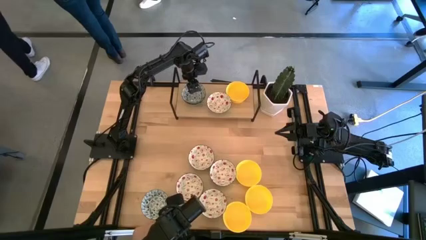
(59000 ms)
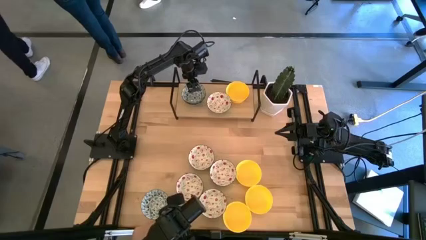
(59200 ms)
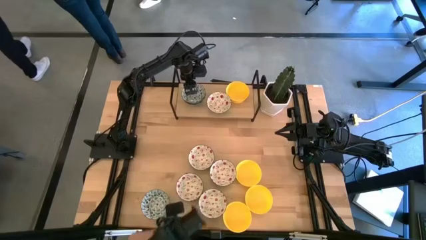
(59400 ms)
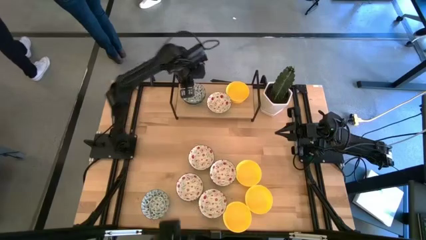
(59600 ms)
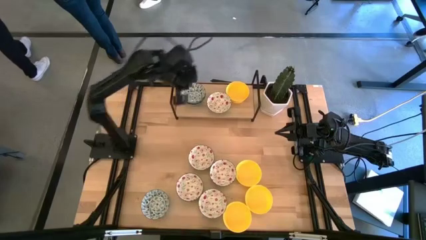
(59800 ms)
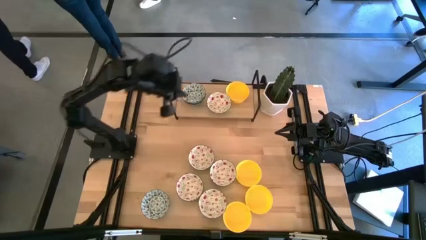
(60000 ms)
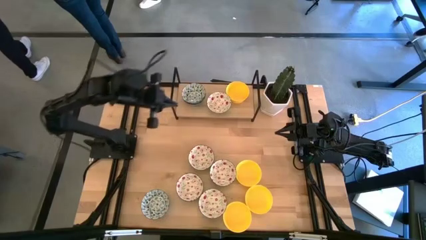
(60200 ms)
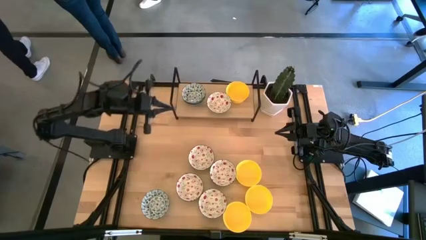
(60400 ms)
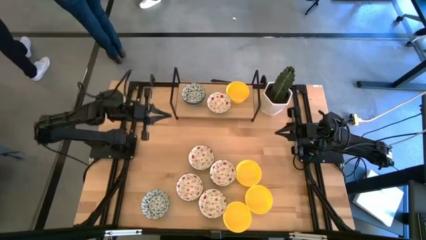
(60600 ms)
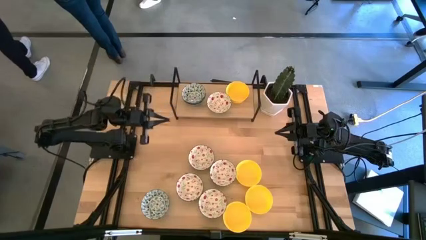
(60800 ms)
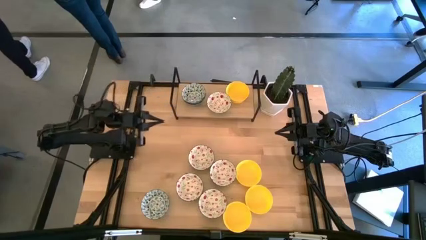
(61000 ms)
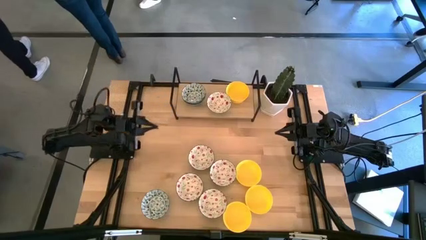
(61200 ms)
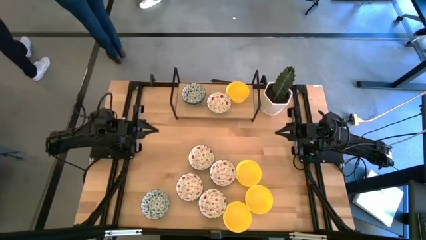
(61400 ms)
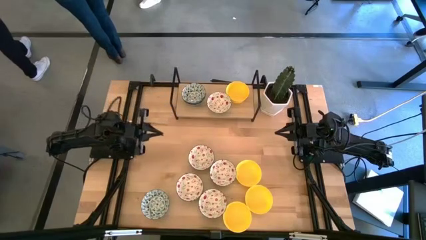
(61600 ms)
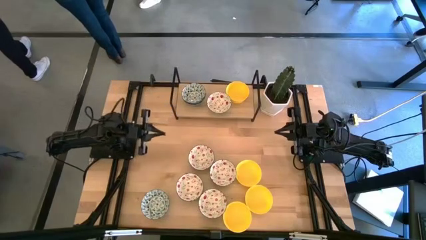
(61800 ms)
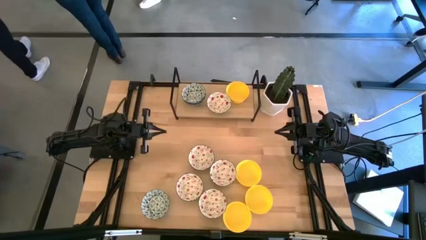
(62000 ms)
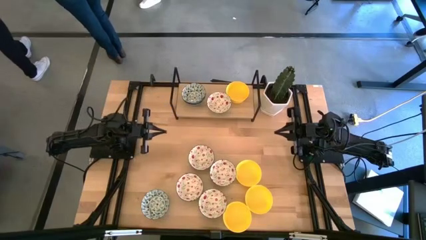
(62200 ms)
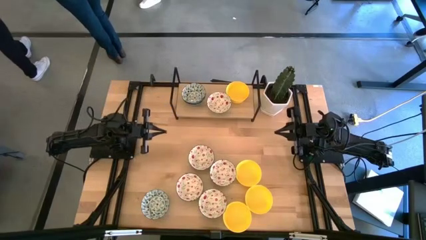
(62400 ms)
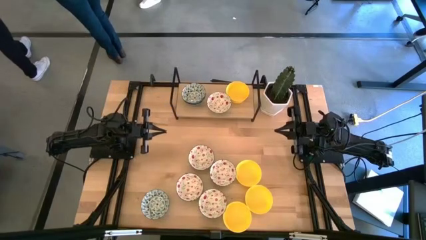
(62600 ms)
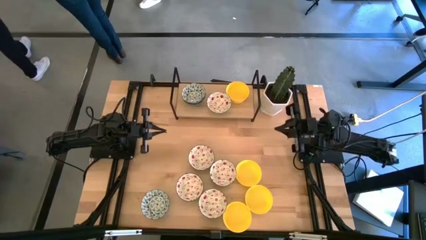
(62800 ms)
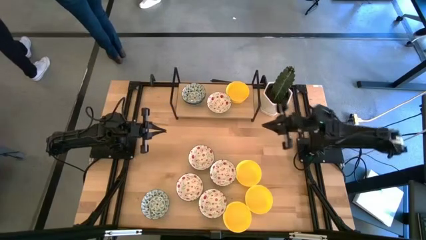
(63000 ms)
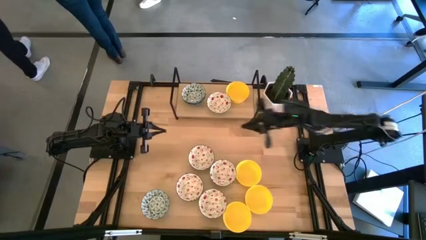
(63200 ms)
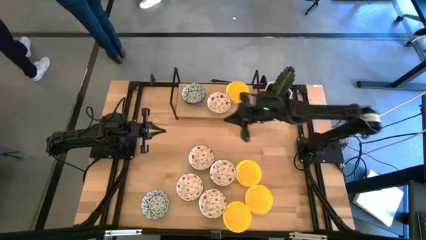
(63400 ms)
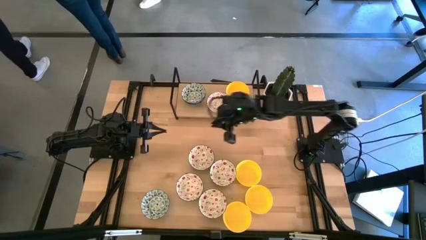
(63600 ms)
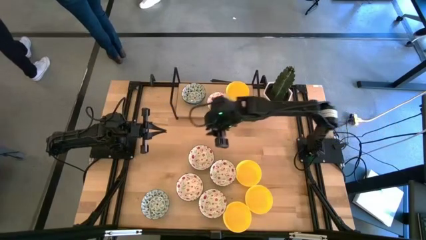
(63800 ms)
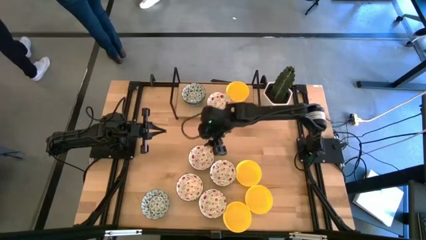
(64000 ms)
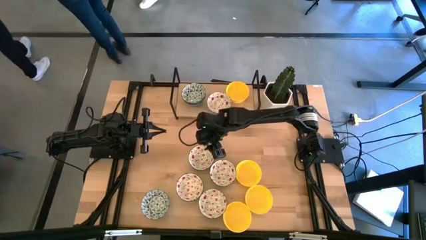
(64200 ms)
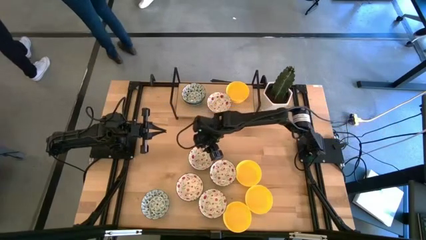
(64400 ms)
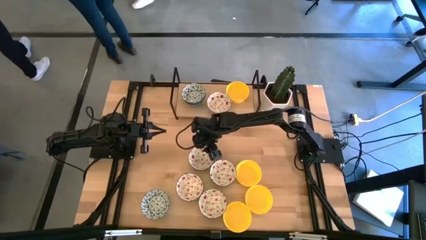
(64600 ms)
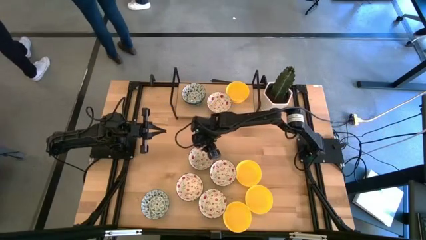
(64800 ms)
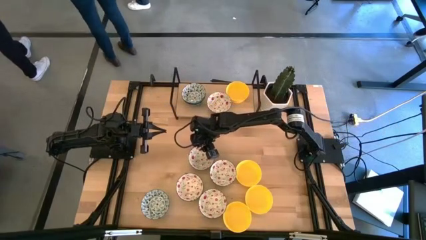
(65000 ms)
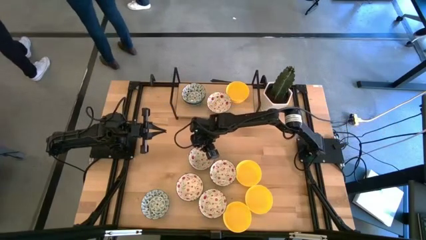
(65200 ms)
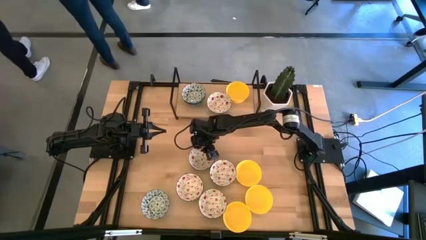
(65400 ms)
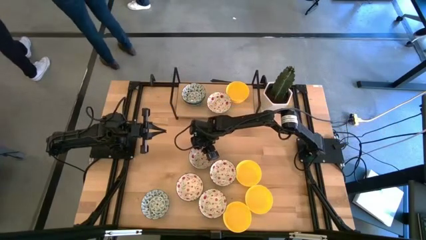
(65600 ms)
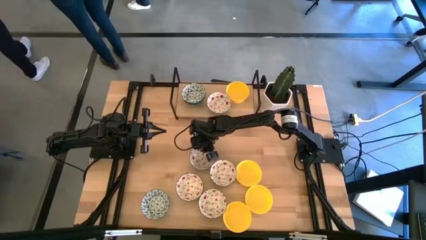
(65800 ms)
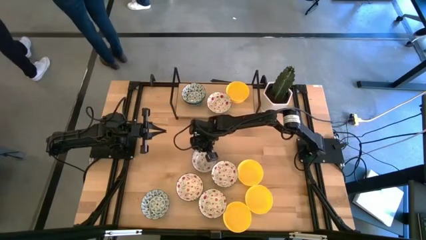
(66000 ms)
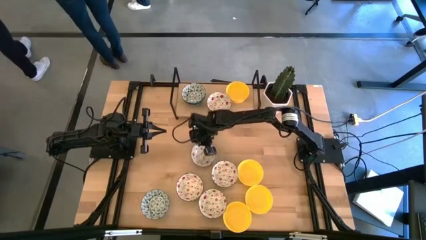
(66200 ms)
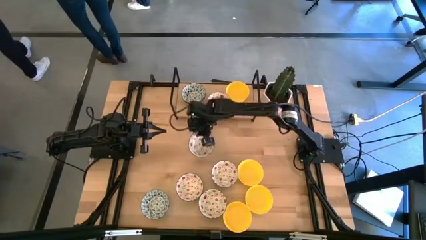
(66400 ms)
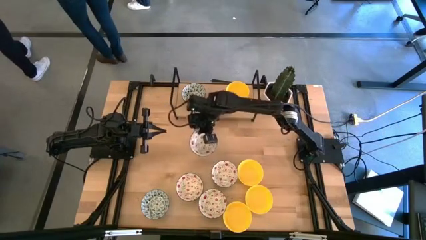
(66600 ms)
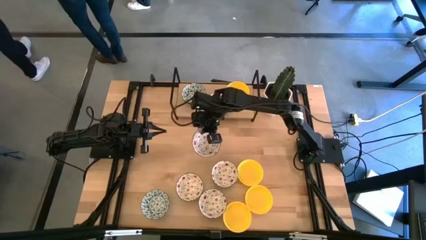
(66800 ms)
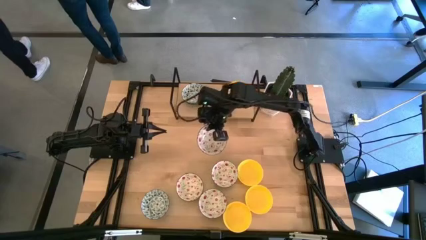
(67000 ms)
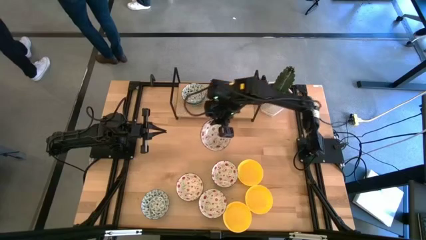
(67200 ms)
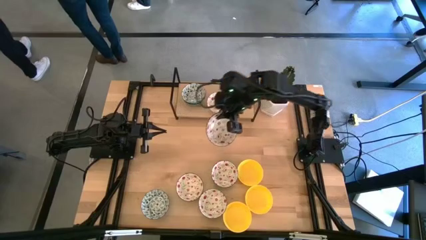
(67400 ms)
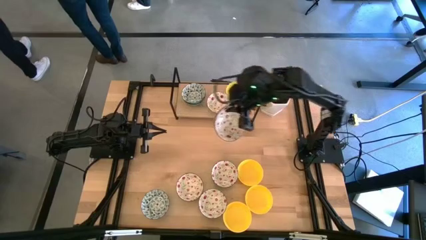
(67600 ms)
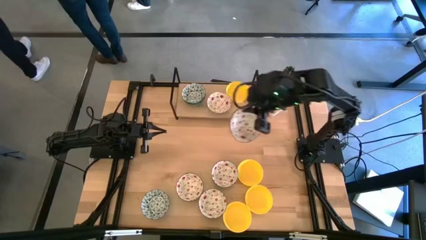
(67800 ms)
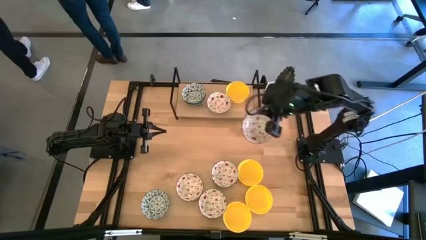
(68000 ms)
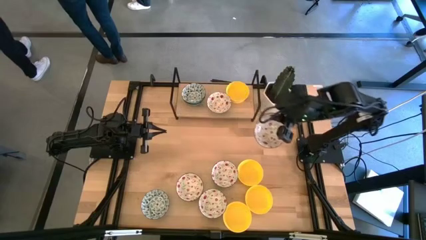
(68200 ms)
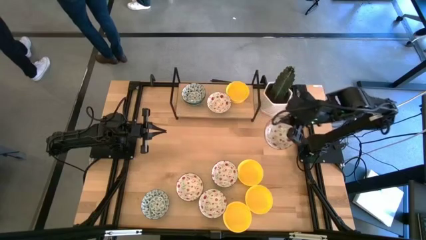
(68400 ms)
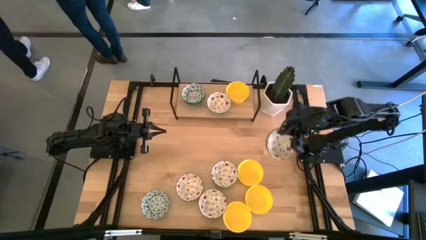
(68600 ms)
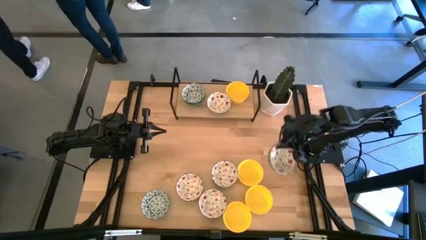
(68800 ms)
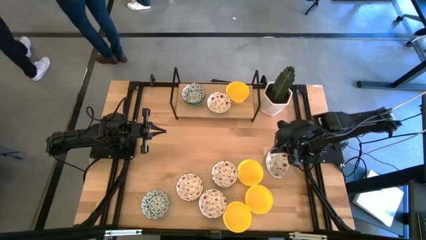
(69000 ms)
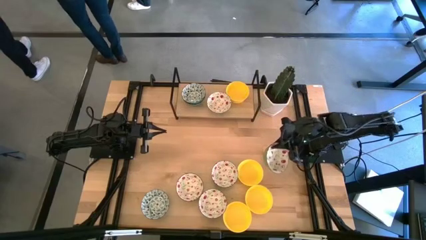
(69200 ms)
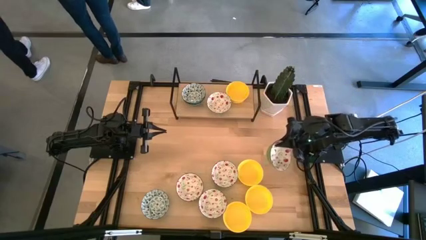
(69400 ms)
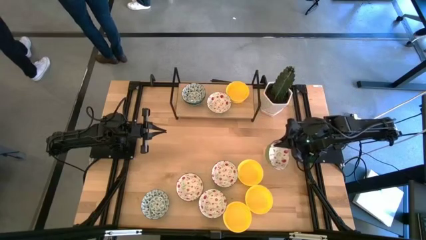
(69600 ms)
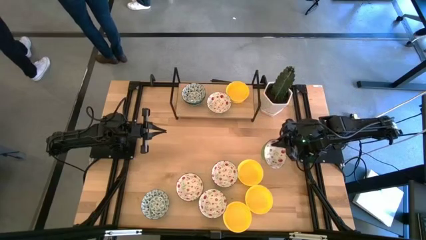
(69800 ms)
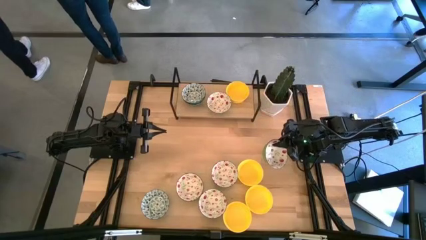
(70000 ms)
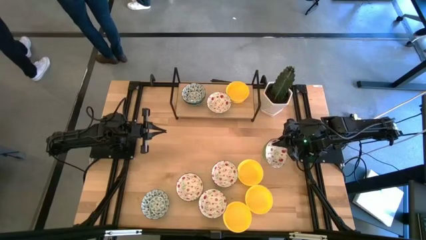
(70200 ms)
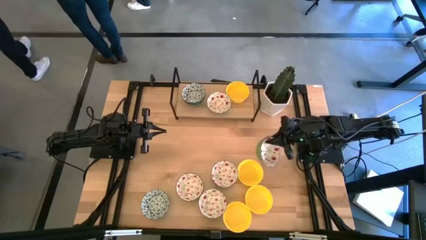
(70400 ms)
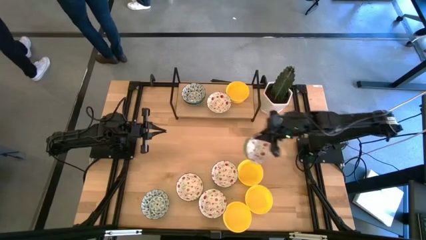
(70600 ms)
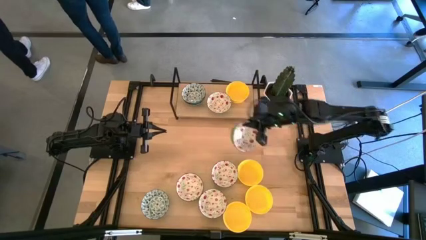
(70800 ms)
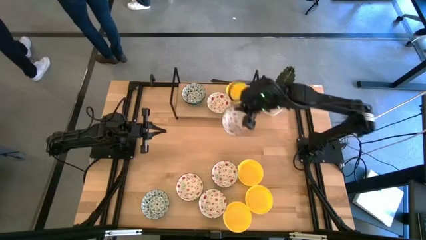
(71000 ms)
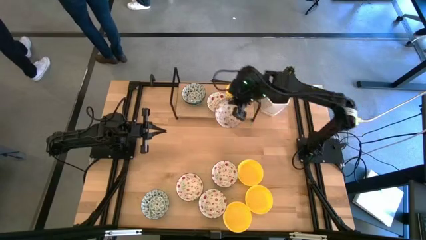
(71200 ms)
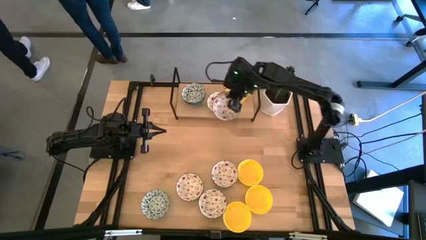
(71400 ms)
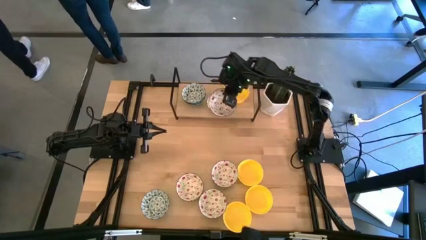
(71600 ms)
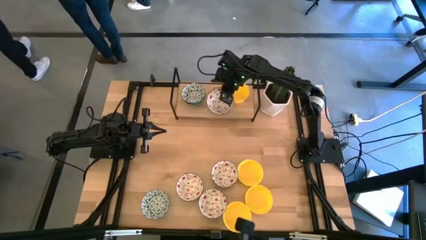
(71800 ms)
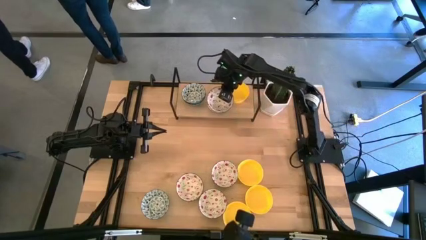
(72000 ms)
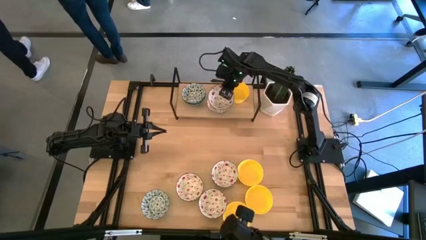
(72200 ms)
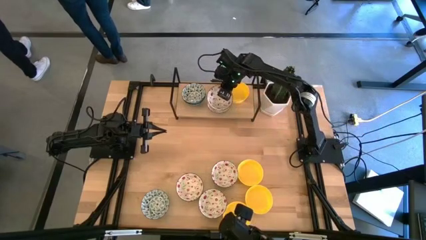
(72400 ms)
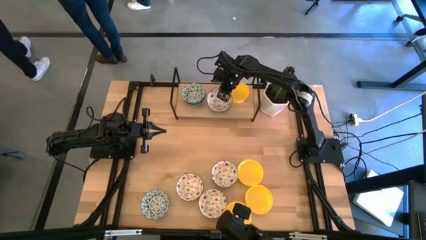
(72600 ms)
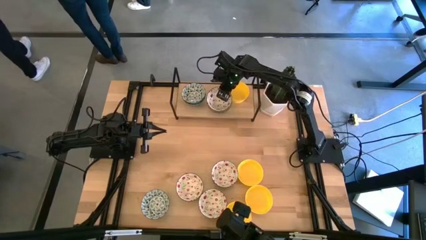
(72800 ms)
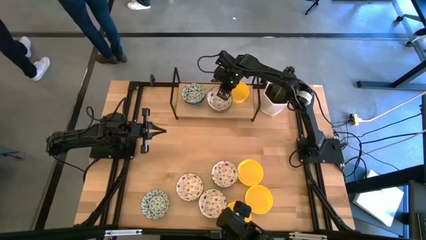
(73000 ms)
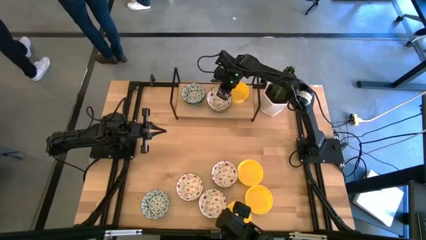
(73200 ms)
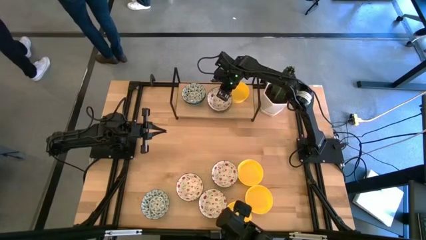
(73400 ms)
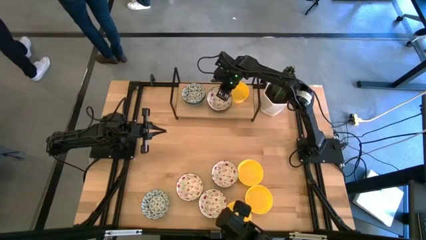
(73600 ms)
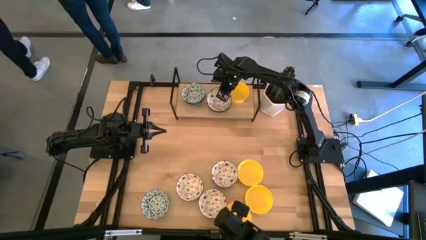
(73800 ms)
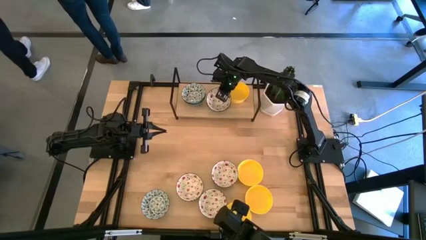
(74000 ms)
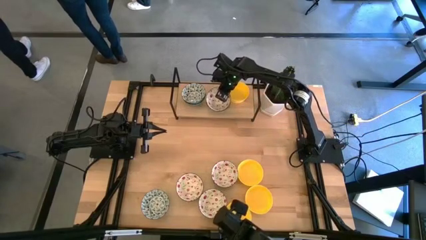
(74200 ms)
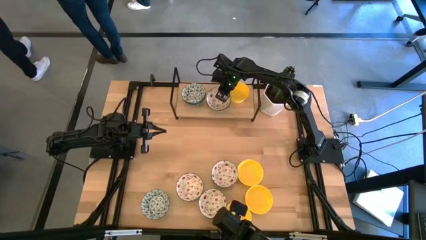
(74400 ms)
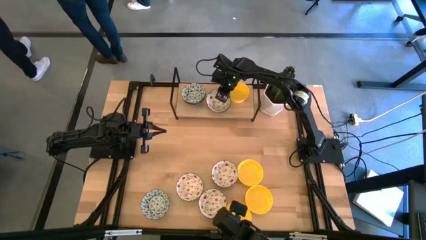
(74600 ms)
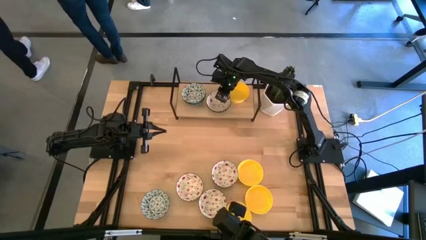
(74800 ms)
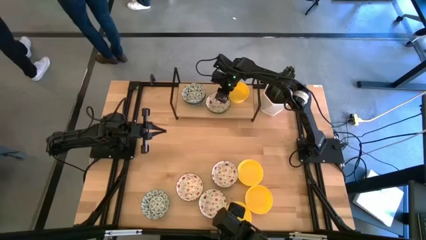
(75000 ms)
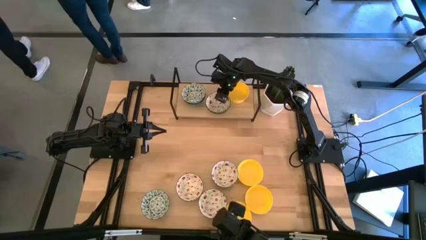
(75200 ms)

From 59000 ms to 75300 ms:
Task: Pick & Place Mini bowls
Stack the red patterned bowl on the red patterned bowl on the shelf
